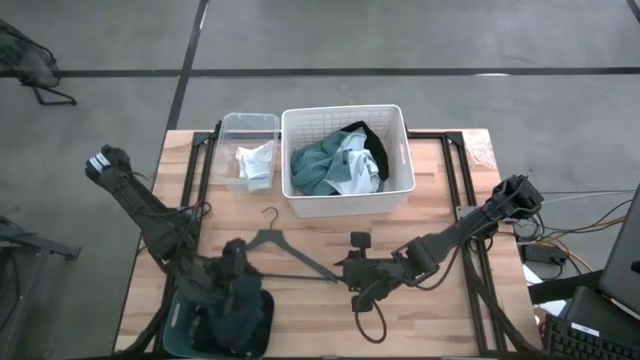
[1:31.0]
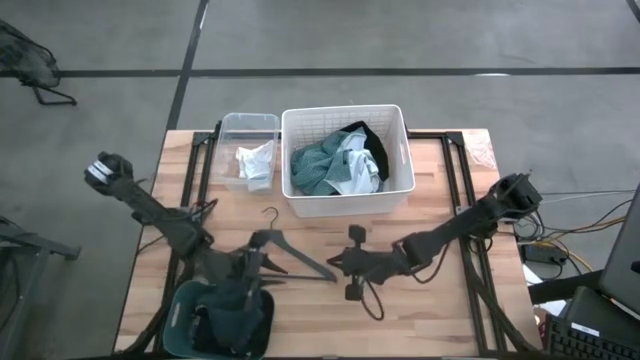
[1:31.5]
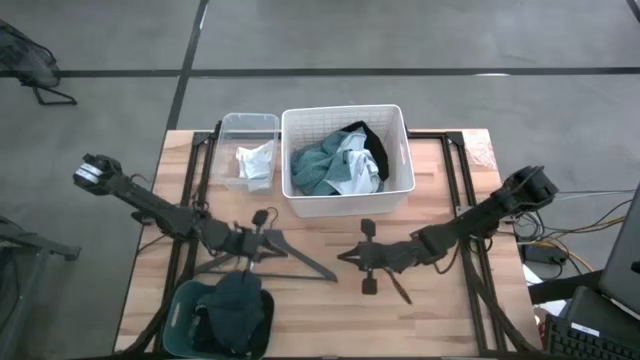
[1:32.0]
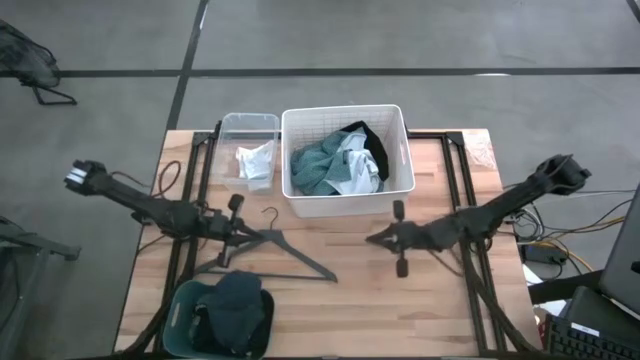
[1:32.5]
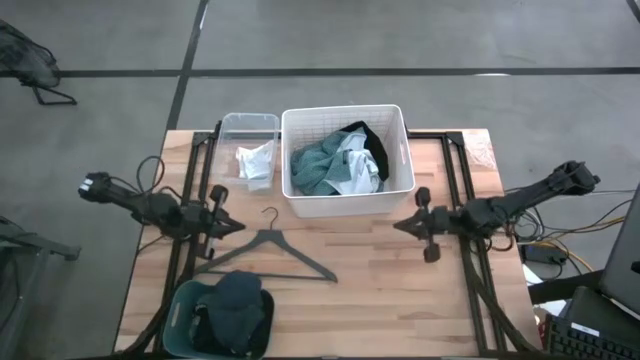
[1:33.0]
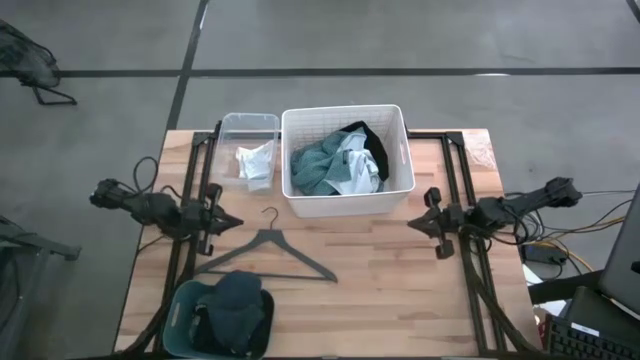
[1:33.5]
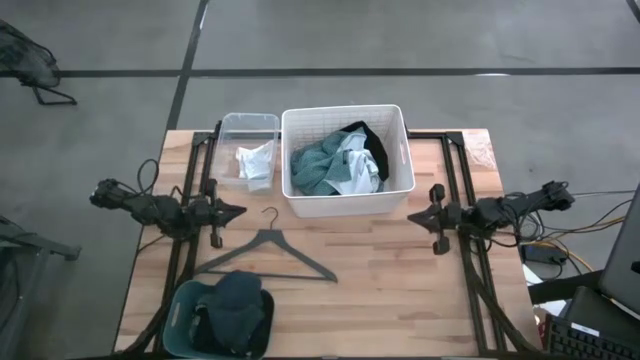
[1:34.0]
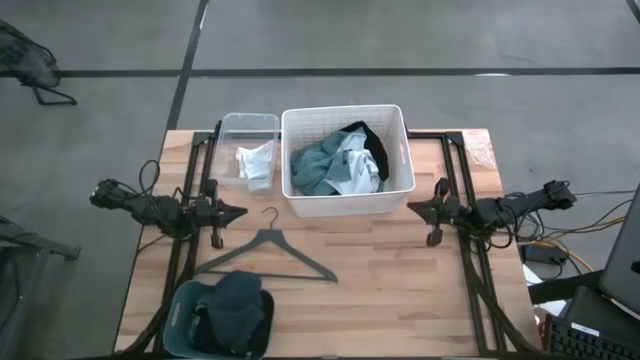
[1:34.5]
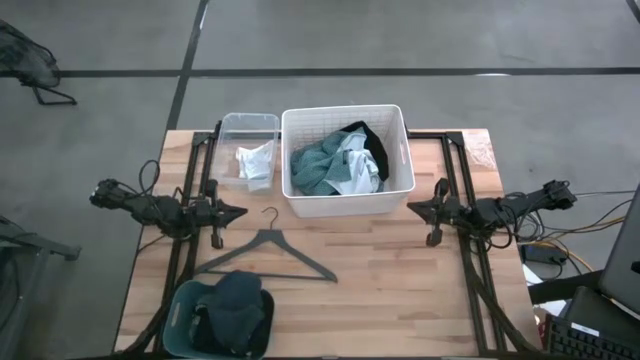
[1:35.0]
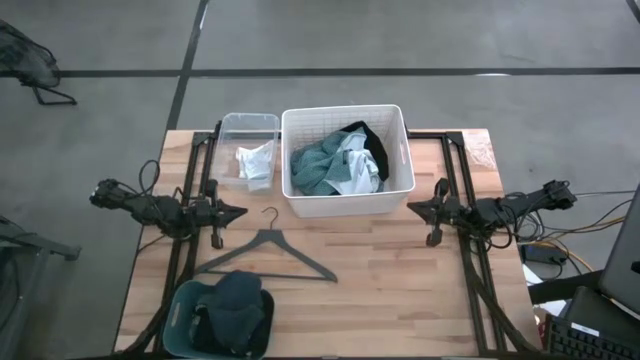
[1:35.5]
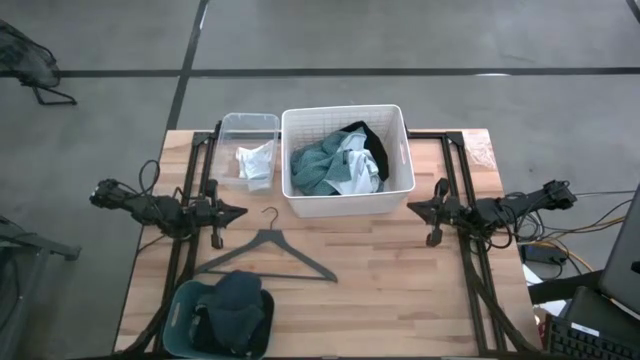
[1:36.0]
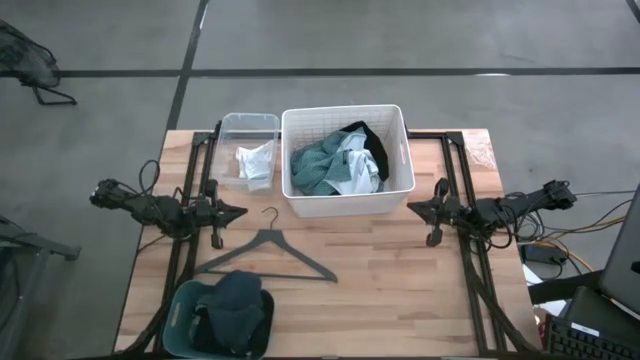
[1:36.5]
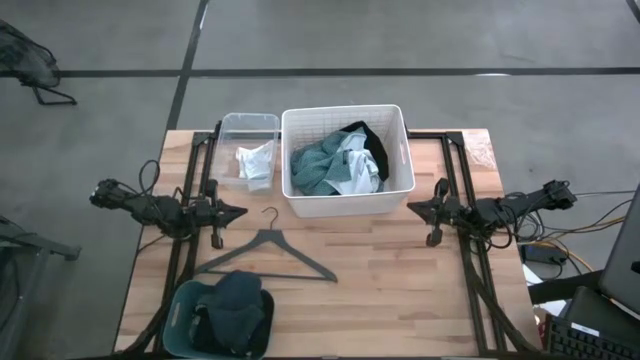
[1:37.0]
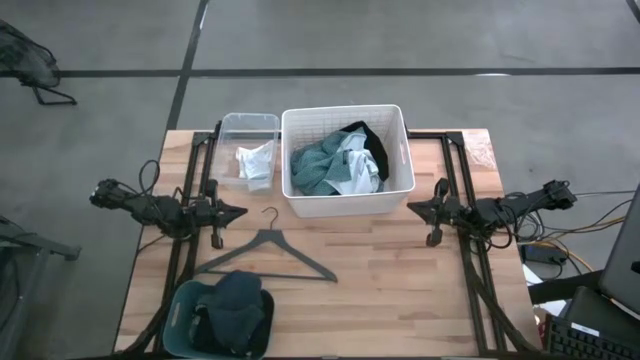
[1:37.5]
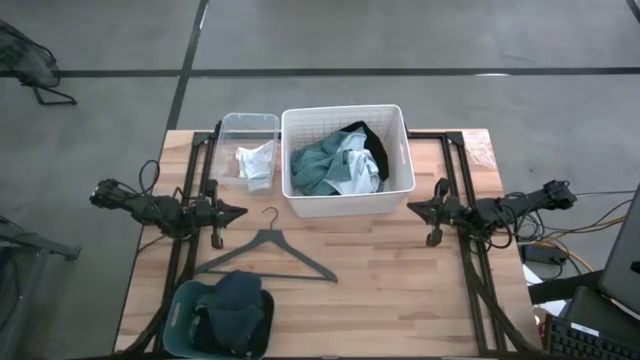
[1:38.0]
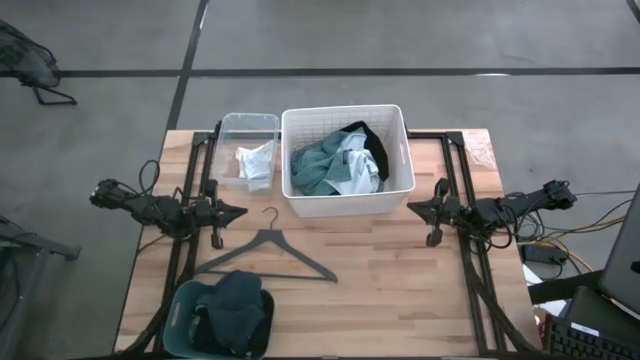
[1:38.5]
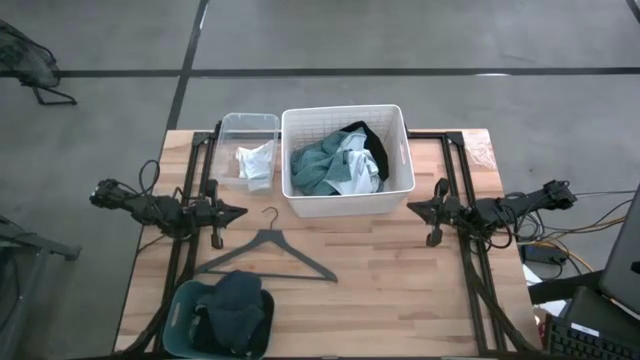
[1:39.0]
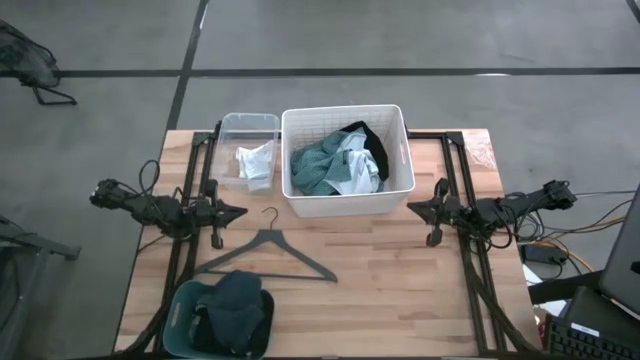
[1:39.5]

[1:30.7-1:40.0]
Task: Pick & Place Cloths
Return to Home Position

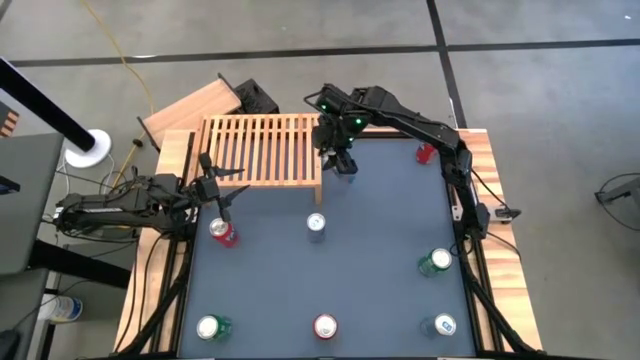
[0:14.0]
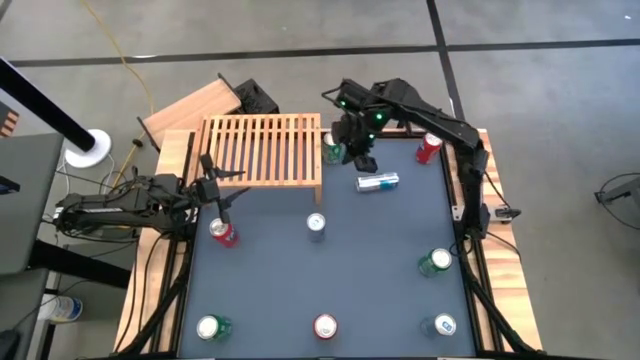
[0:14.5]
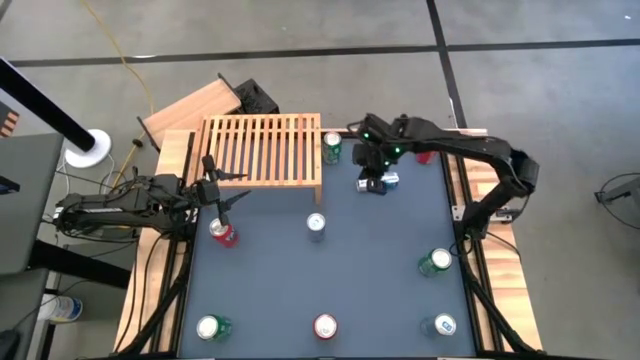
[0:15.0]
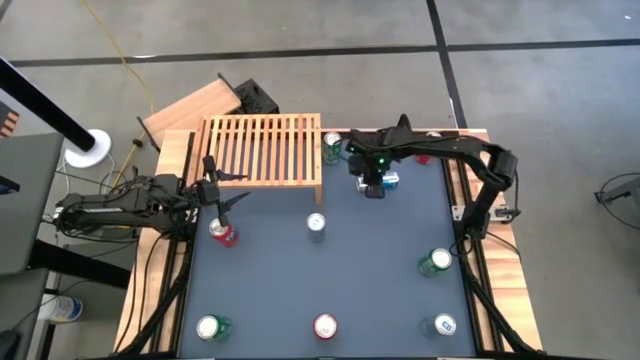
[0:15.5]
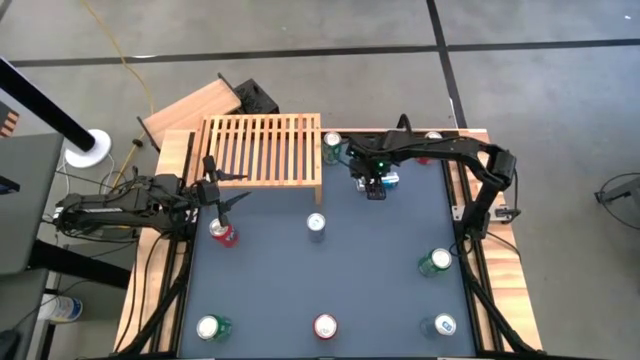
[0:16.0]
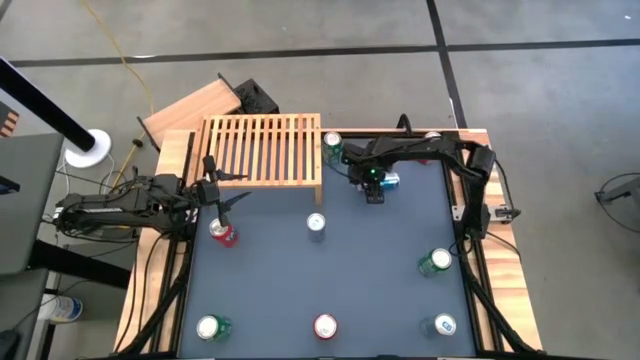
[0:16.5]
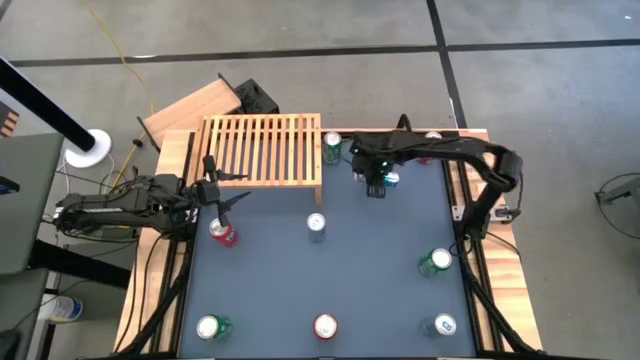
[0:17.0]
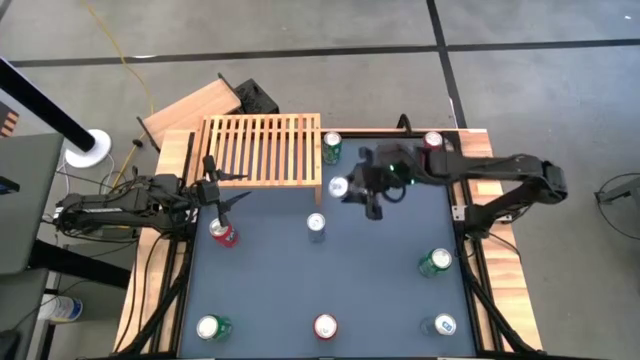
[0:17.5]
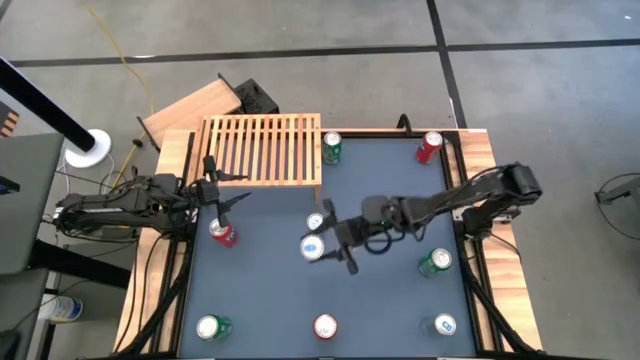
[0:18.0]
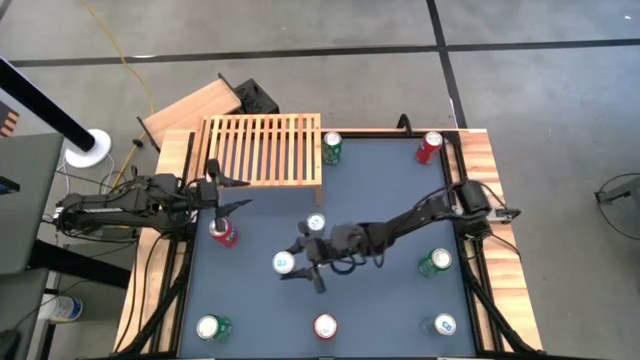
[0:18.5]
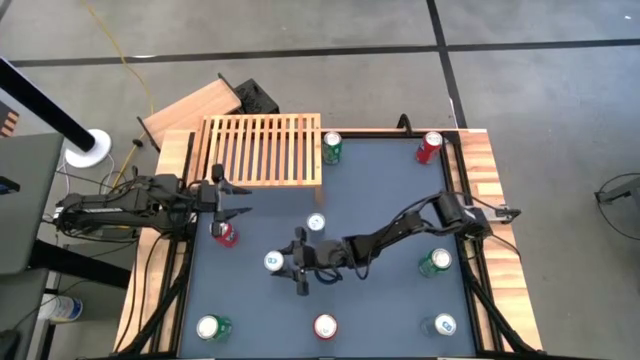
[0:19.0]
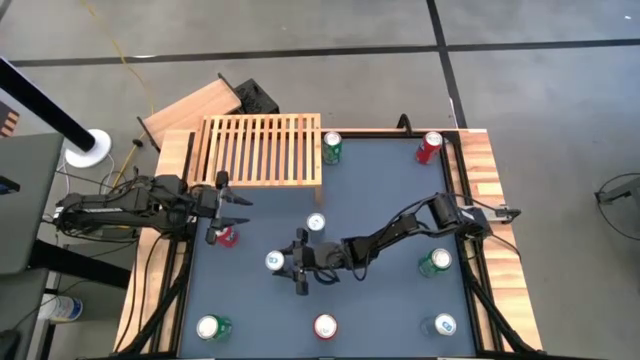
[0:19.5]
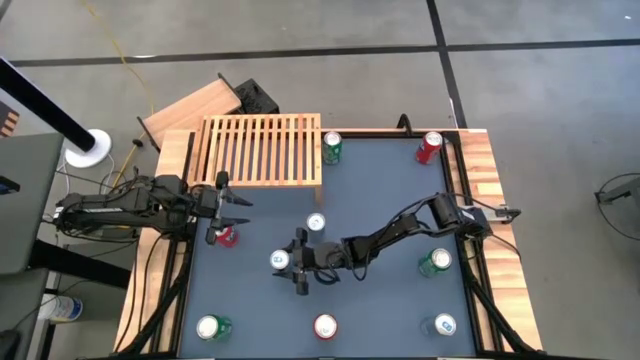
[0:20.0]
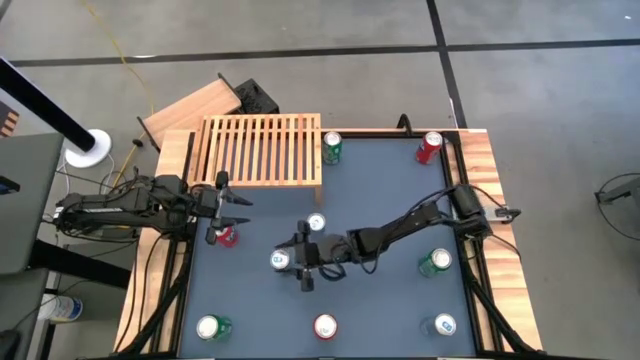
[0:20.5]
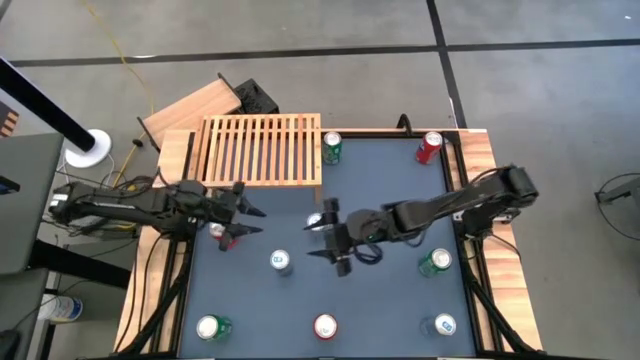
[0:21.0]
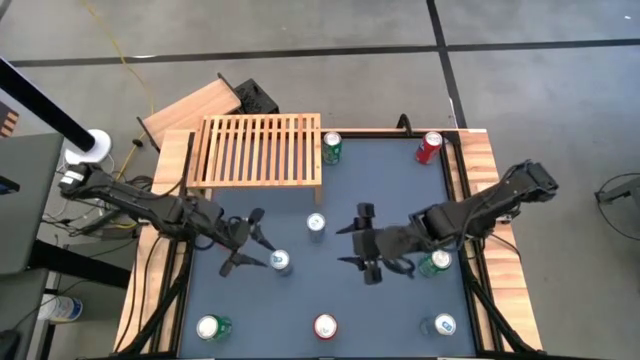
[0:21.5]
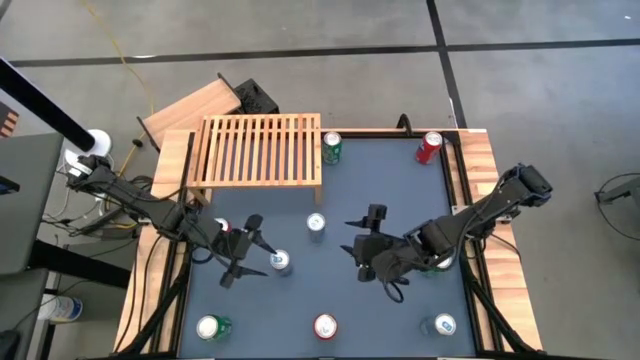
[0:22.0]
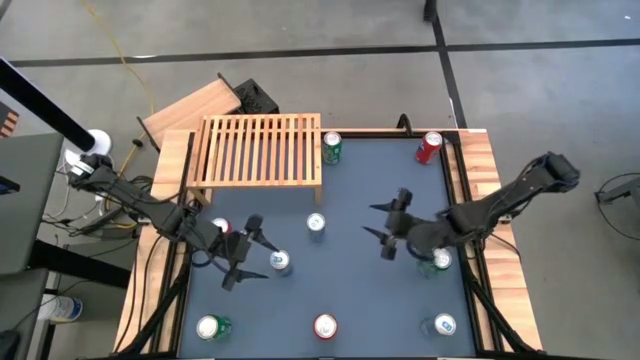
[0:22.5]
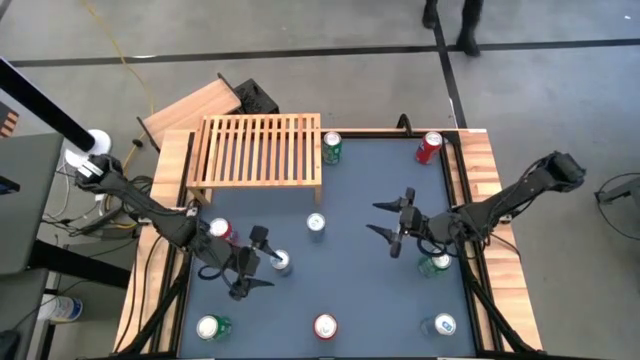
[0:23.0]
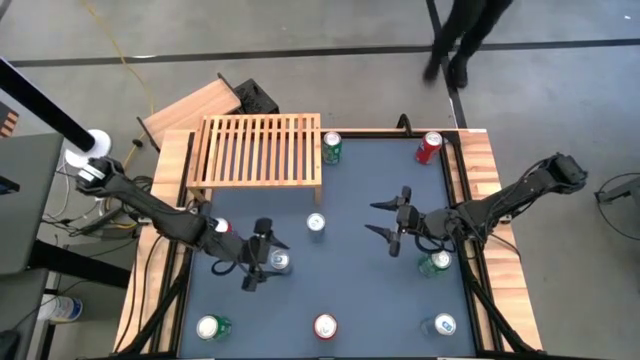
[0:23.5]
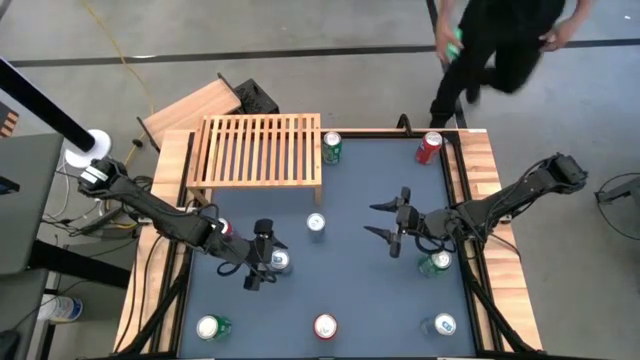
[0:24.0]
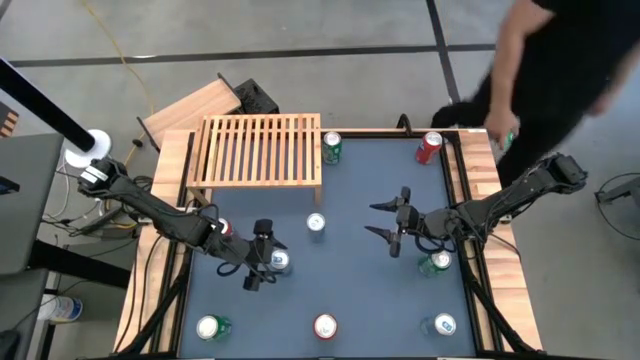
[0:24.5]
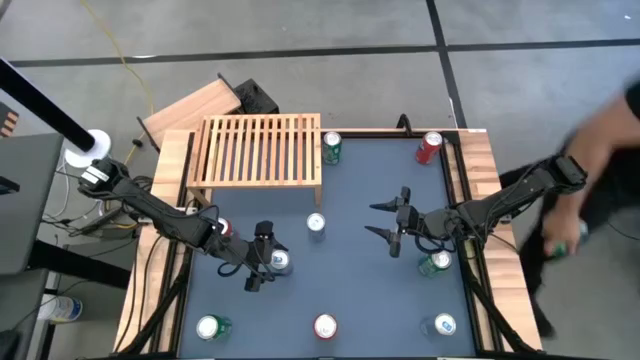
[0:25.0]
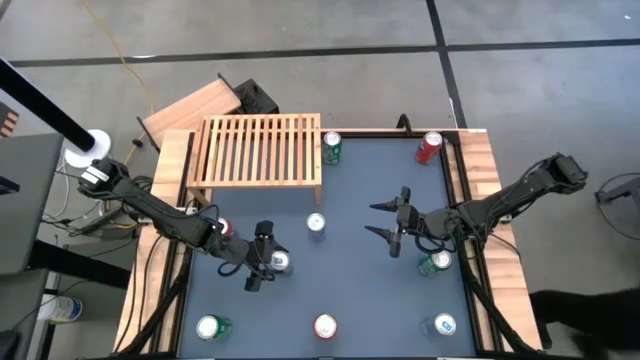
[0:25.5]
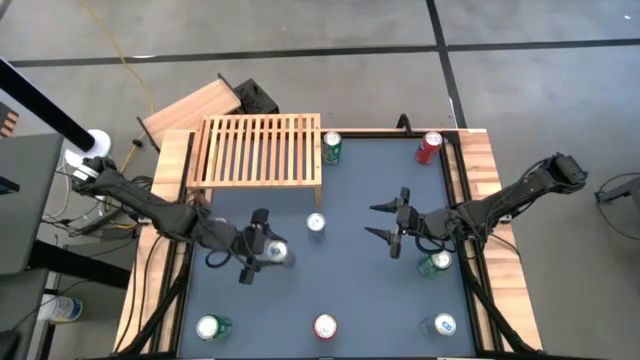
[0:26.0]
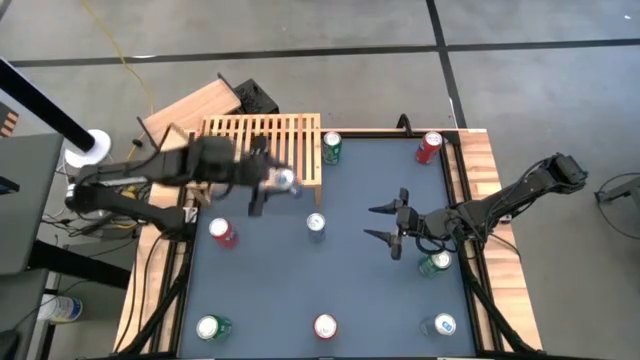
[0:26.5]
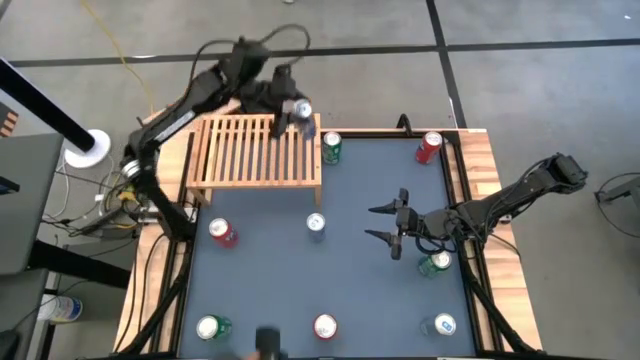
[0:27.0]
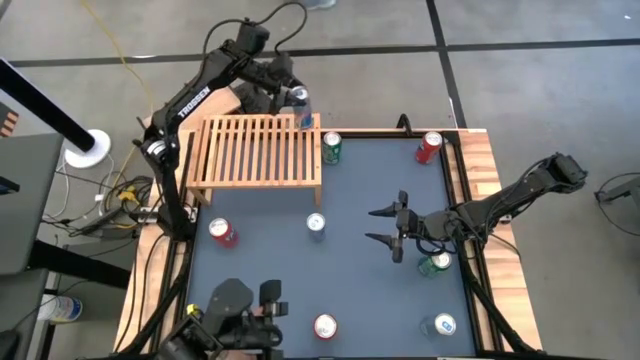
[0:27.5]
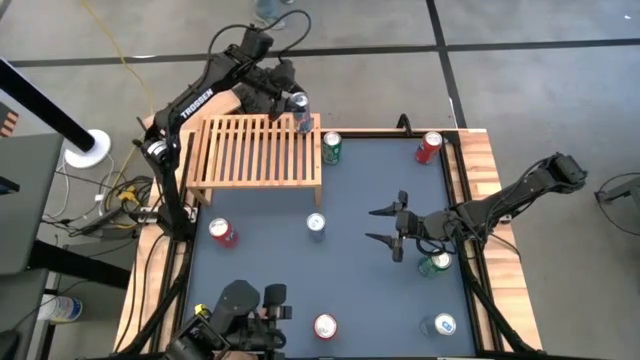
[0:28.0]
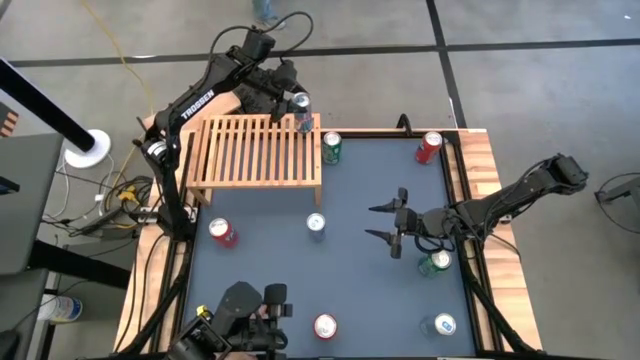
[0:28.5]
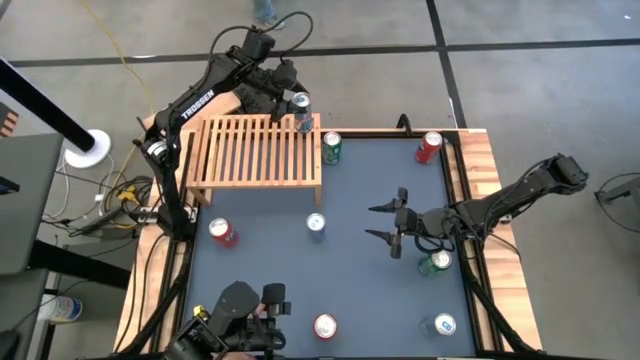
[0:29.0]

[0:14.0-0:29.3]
Task: Place canned beverage on shelf
Put the top blue soda can on the shelf
